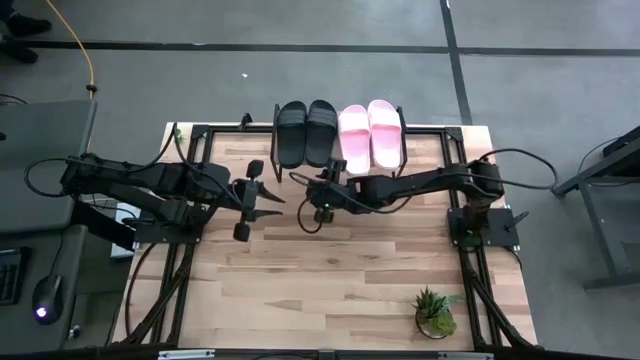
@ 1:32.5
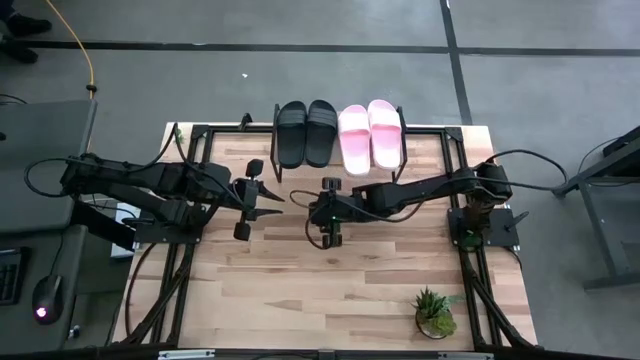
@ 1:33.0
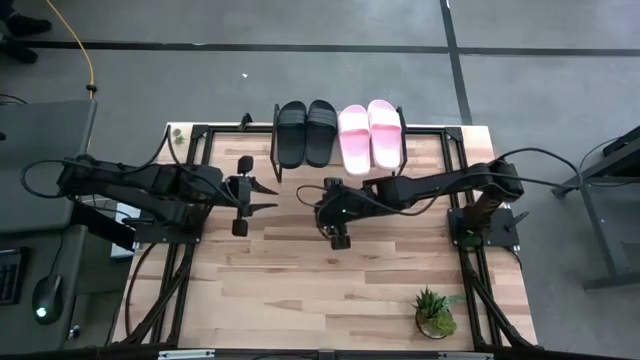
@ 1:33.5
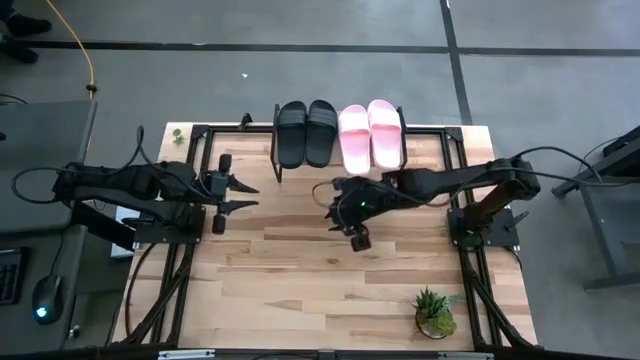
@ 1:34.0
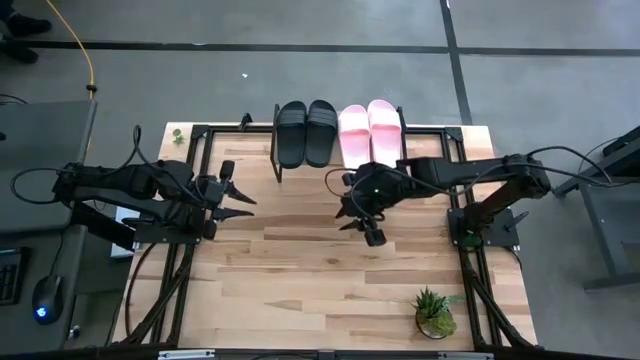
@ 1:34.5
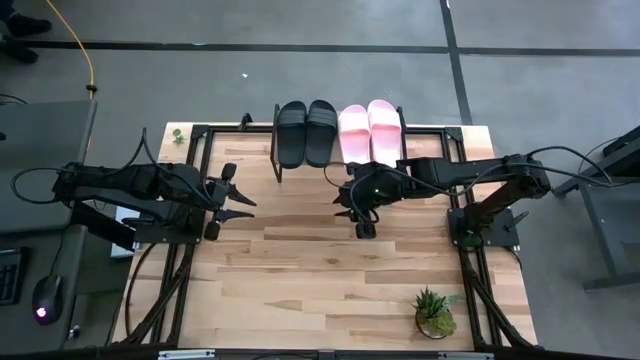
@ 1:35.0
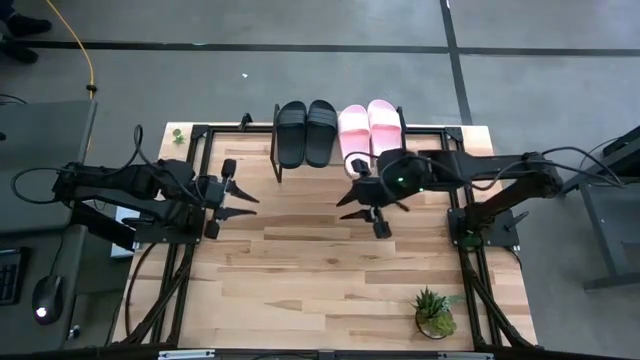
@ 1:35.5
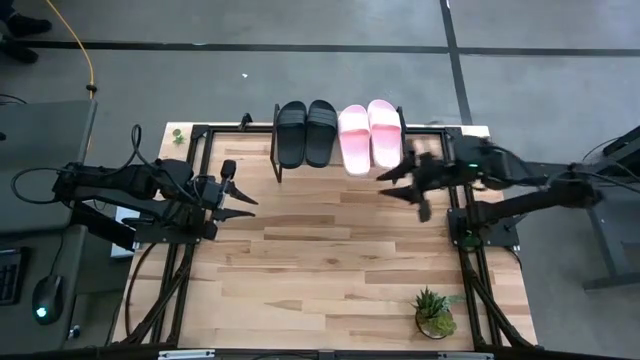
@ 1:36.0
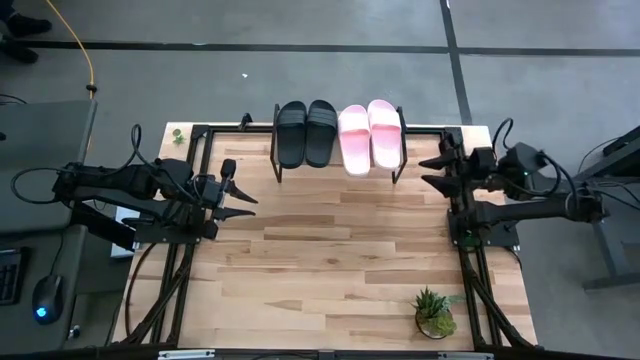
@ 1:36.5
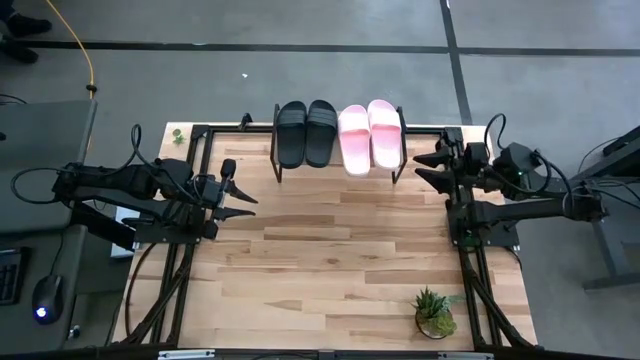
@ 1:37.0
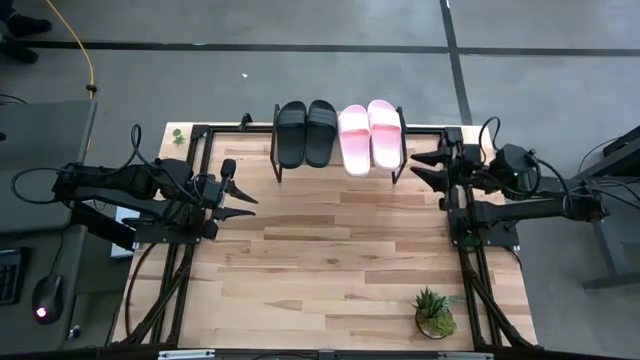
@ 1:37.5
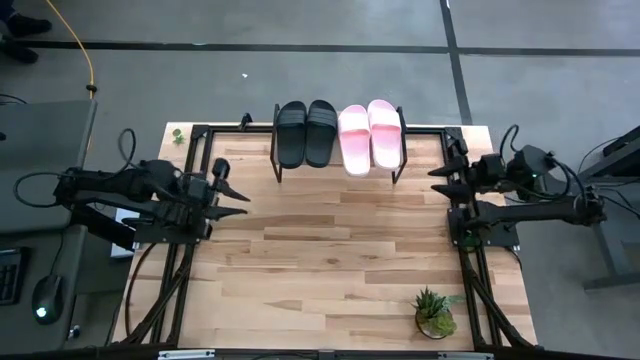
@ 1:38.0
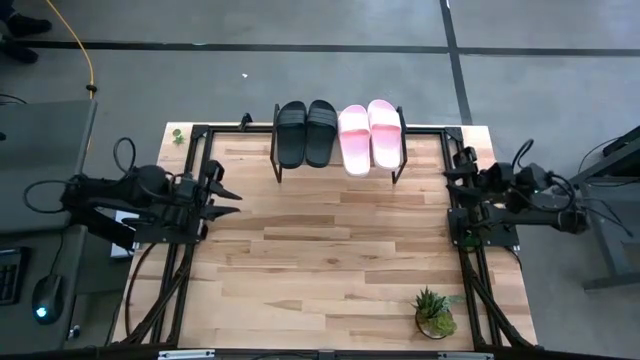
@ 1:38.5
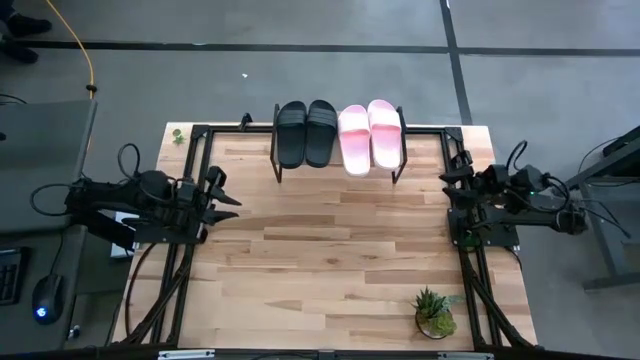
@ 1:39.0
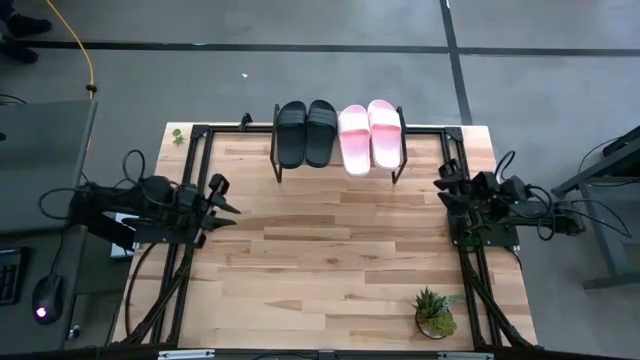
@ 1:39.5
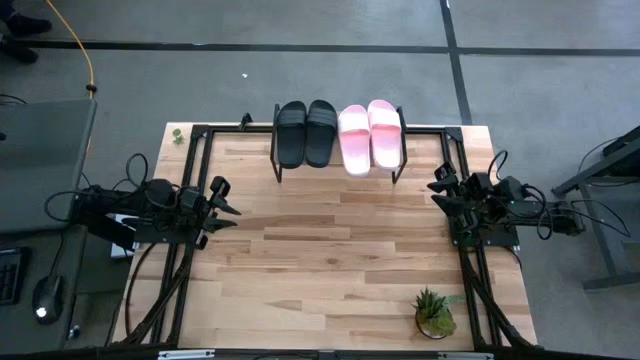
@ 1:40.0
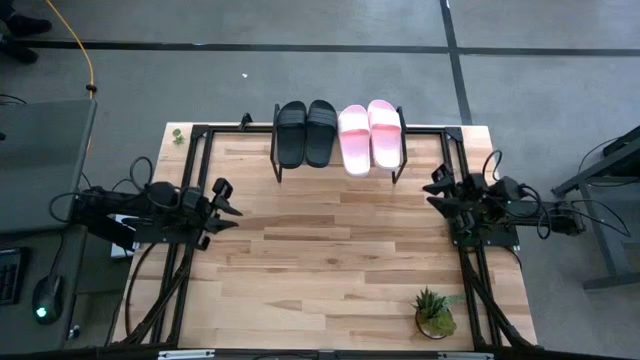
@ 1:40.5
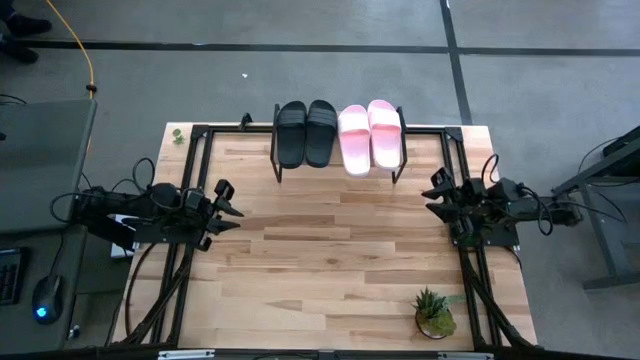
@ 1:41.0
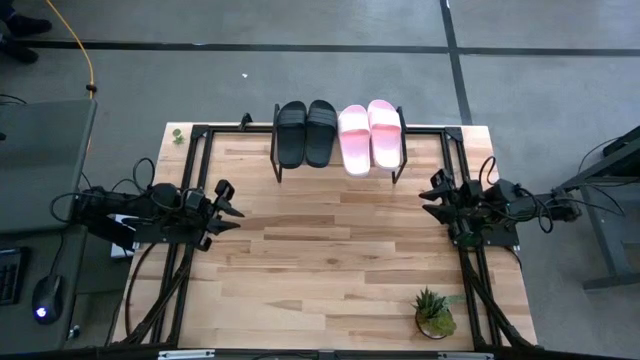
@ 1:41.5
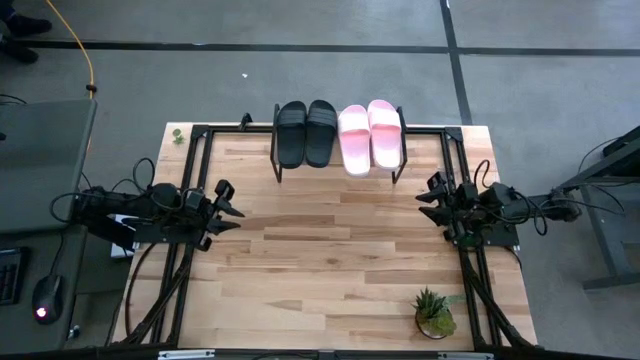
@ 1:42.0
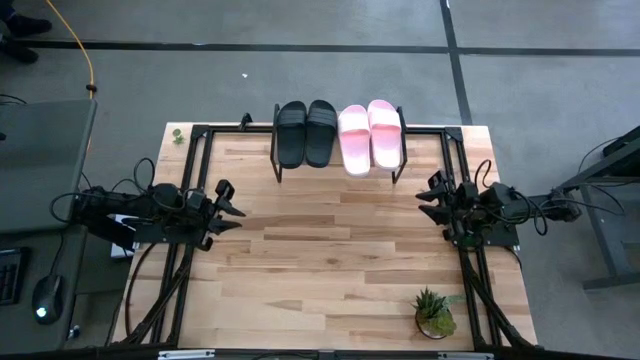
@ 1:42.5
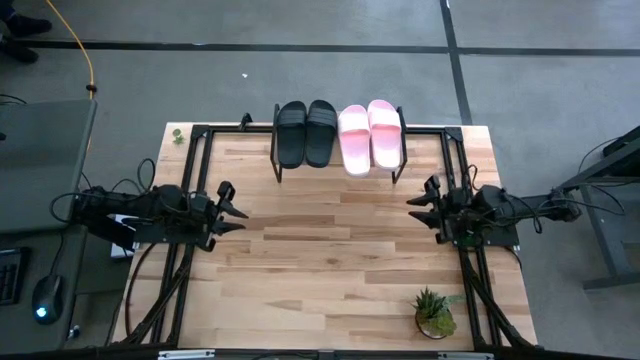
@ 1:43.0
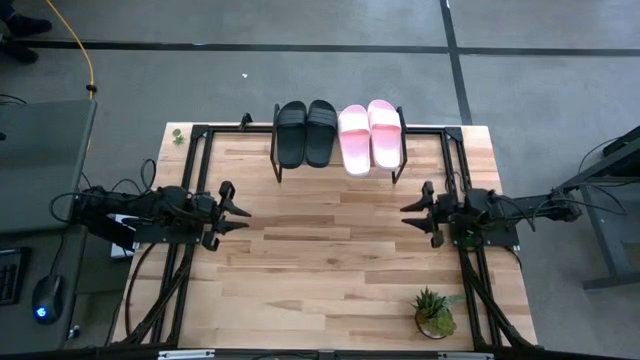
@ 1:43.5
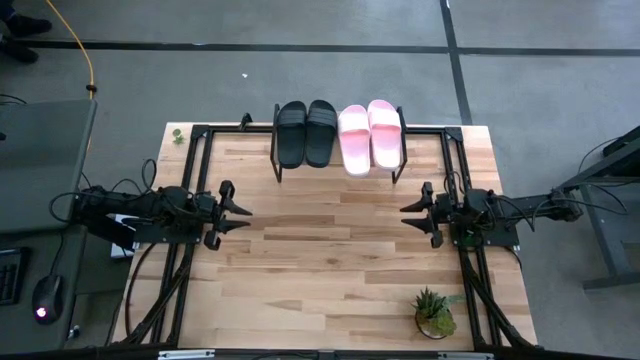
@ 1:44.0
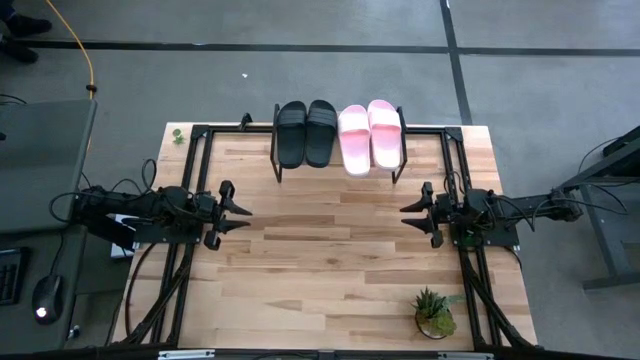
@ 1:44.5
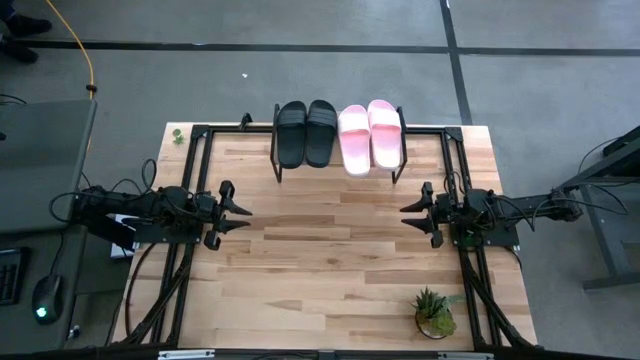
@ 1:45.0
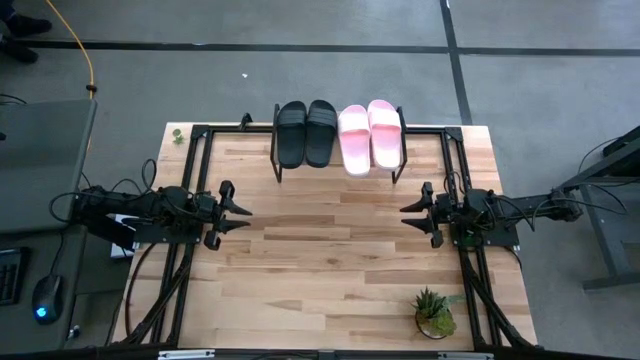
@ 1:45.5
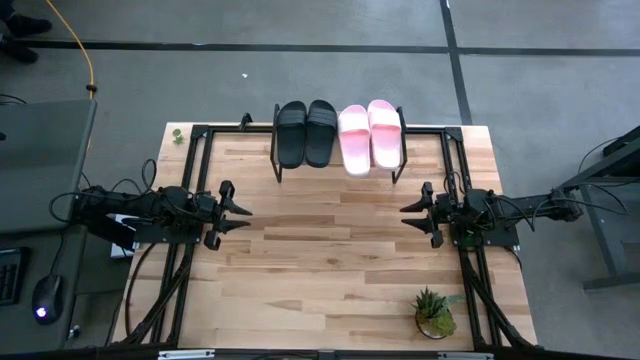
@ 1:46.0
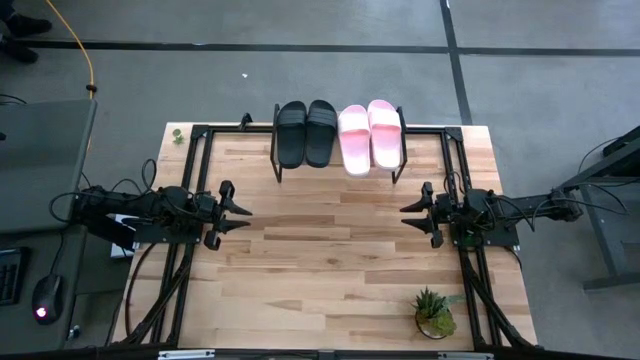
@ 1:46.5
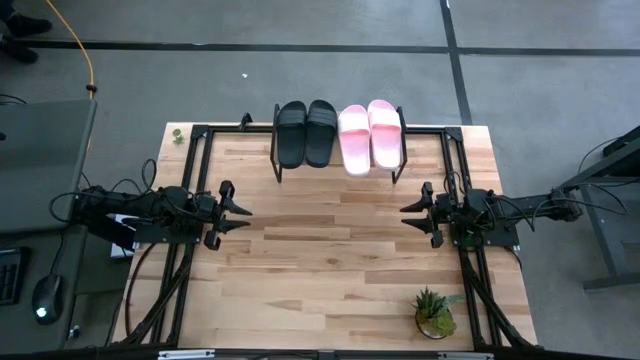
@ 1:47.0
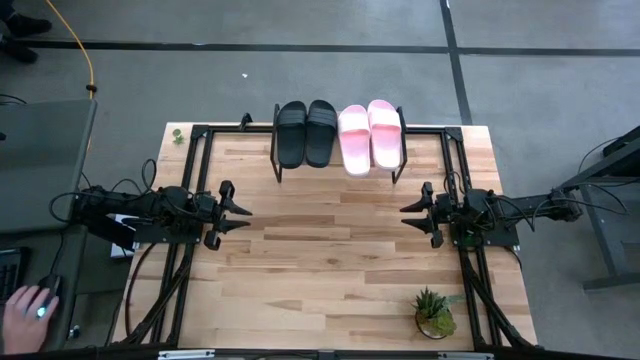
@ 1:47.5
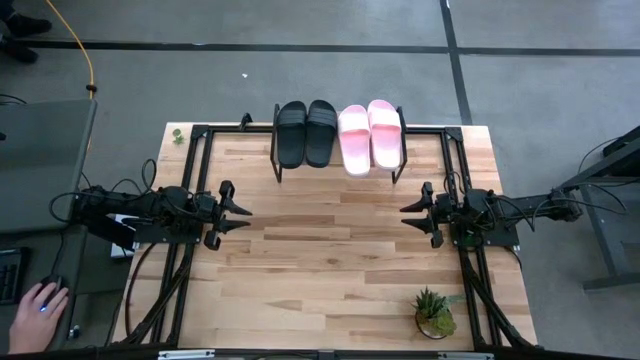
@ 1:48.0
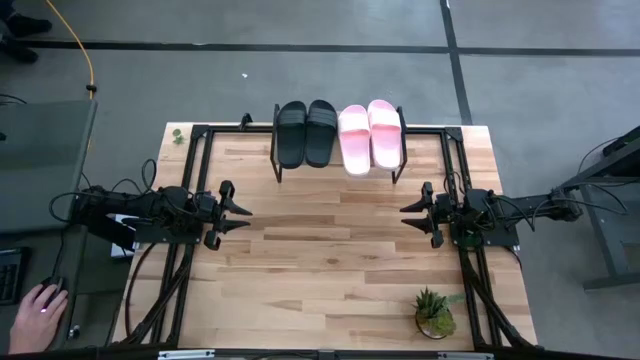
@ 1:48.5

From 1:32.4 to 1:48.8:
Task: Pick and place slides into the shelf
Return to Home Position

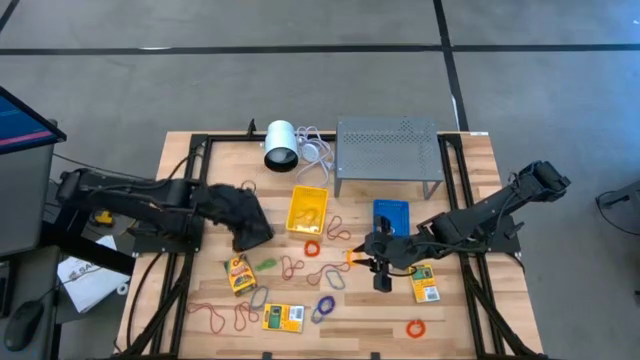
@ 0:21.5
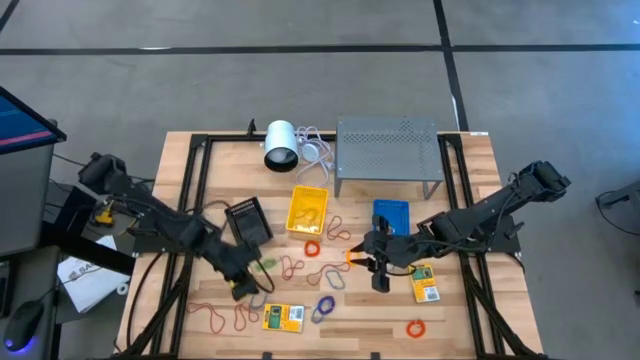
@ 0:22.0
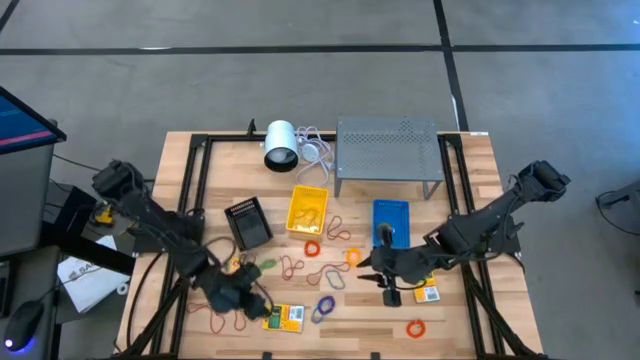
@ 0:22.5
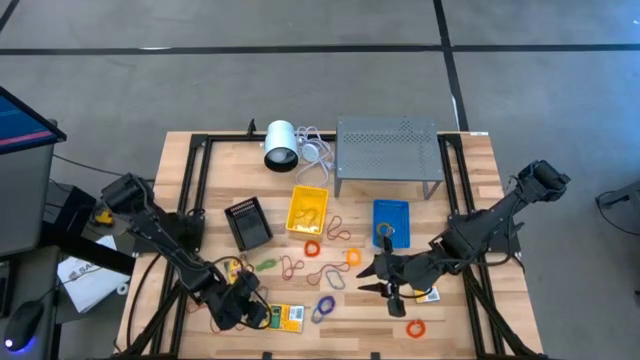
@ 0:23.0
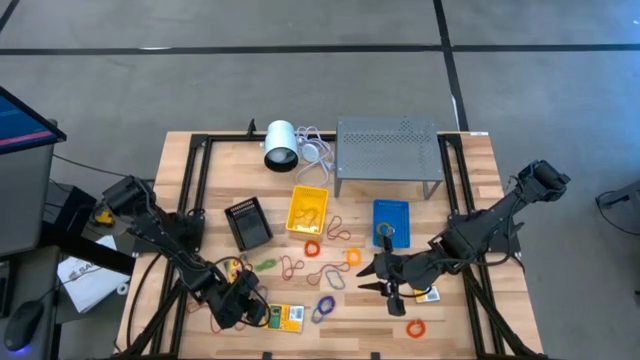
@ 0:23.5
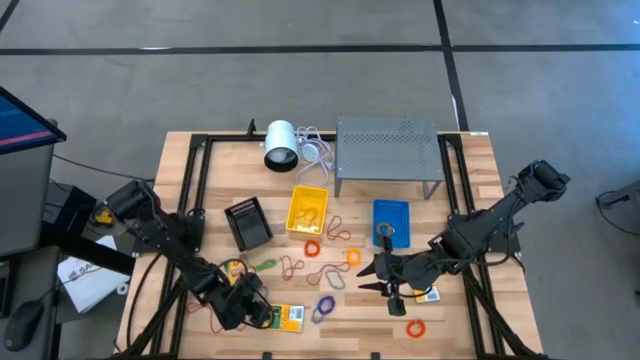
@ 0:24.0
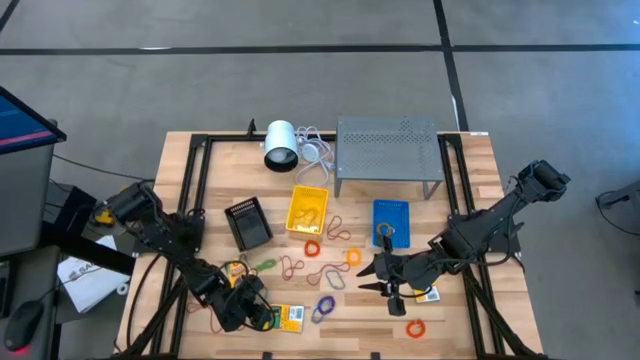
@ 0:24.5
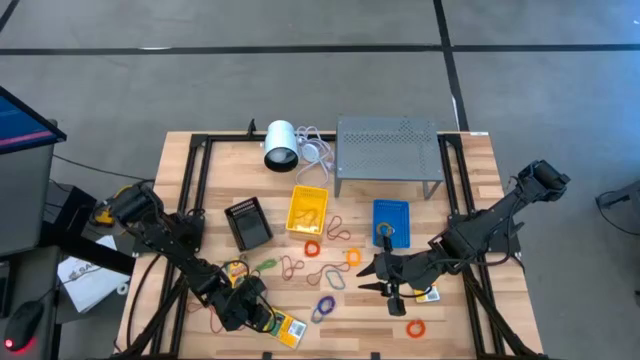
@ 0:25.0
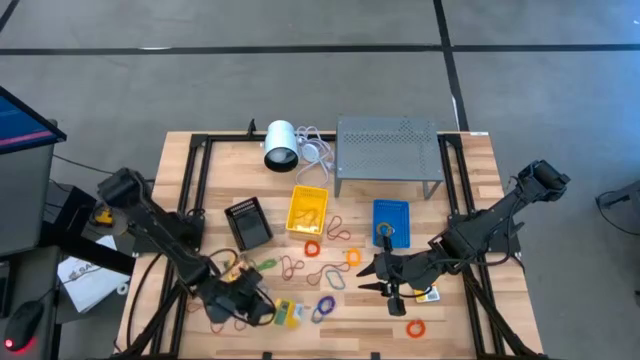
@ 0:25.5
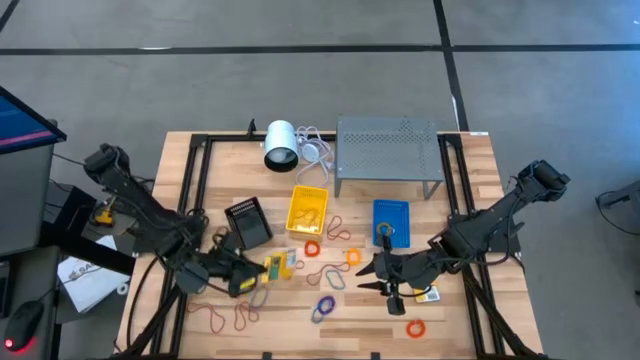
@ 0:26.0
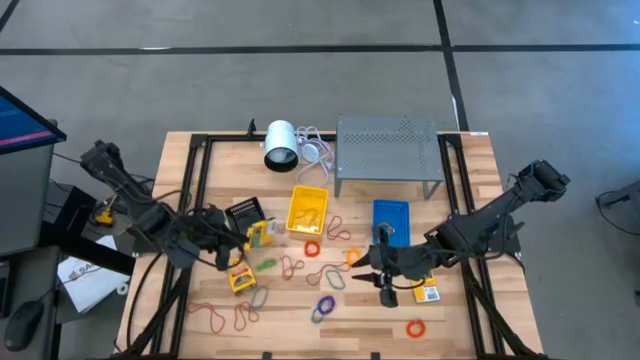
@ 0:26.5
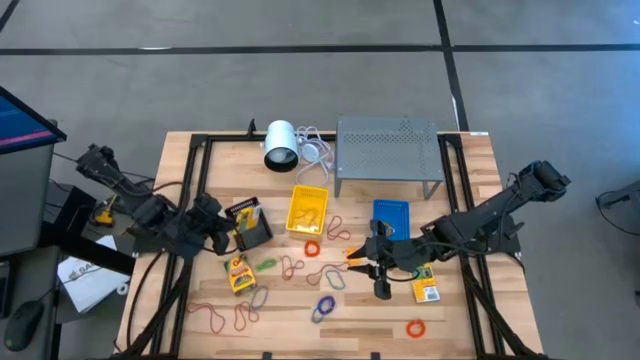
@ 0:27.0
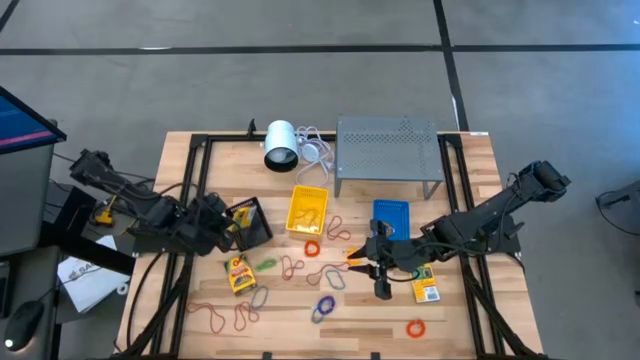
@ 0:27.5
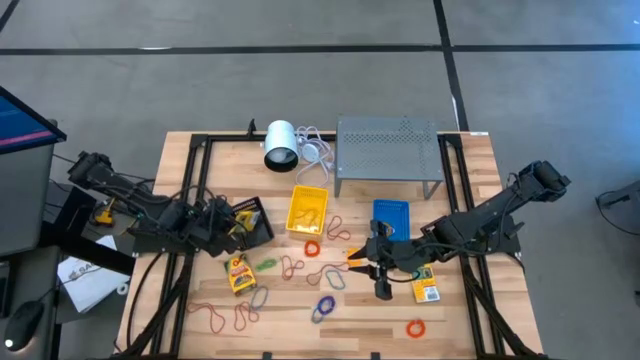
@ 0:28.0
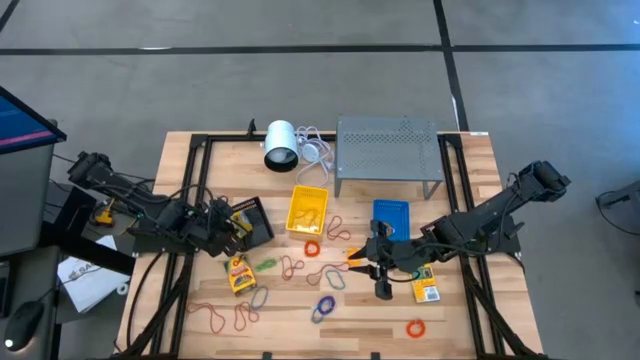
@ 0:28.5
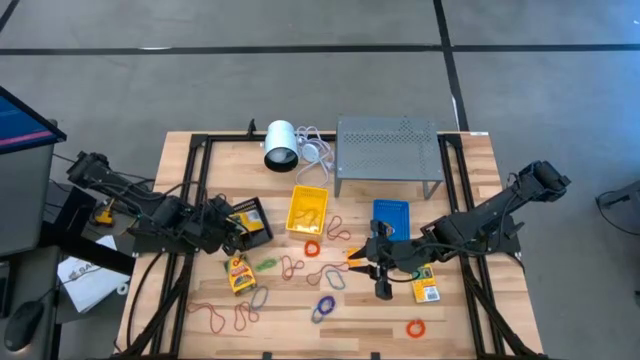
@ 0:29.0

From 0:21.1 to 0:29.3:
Task: Pick & Place Office Desk Supplies
Put the left crayon box into the black basket
